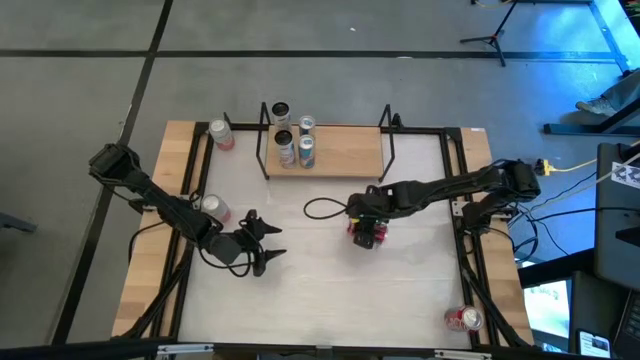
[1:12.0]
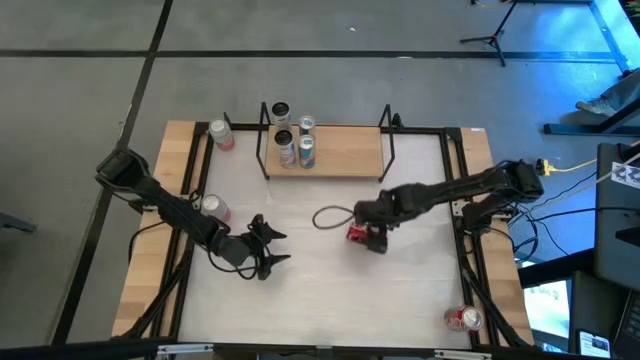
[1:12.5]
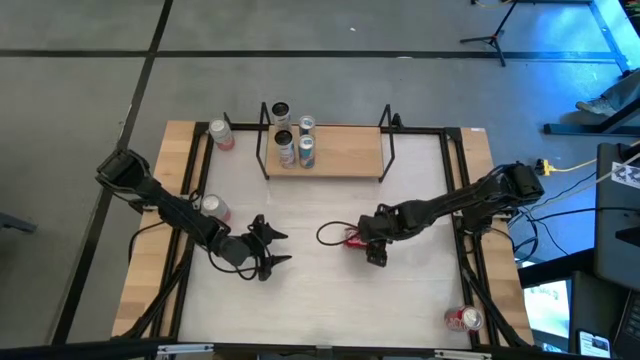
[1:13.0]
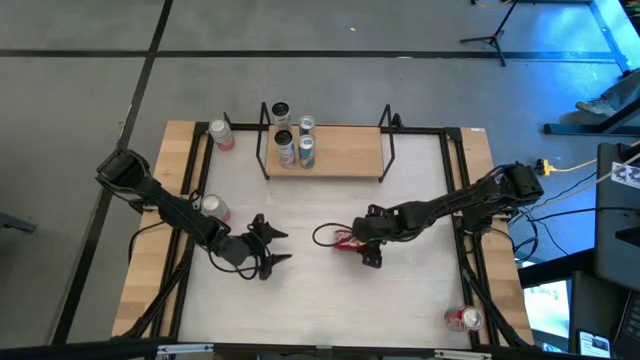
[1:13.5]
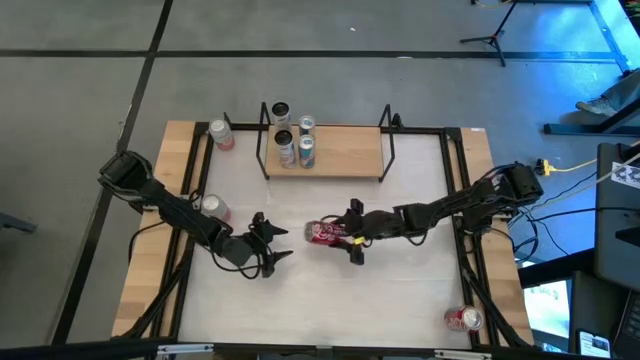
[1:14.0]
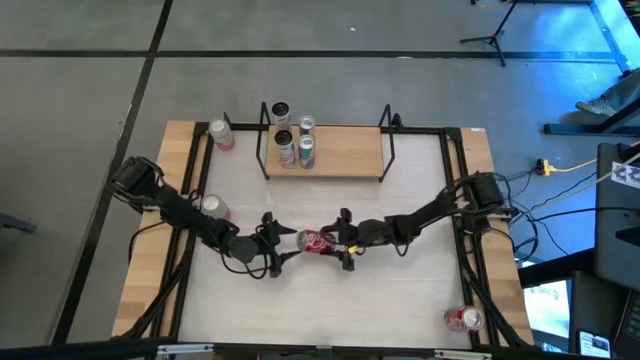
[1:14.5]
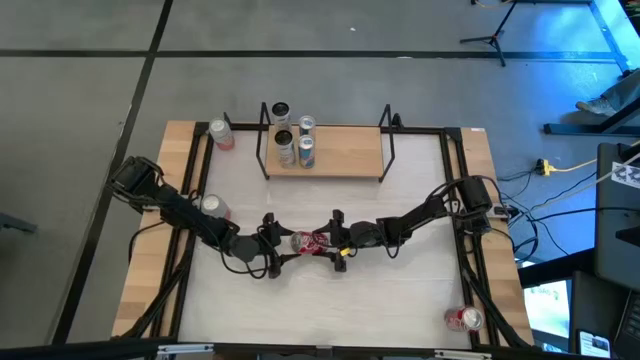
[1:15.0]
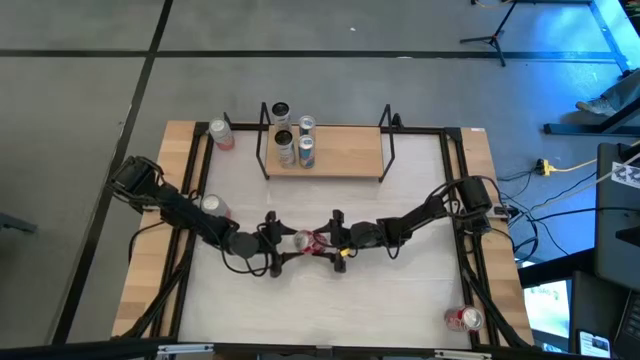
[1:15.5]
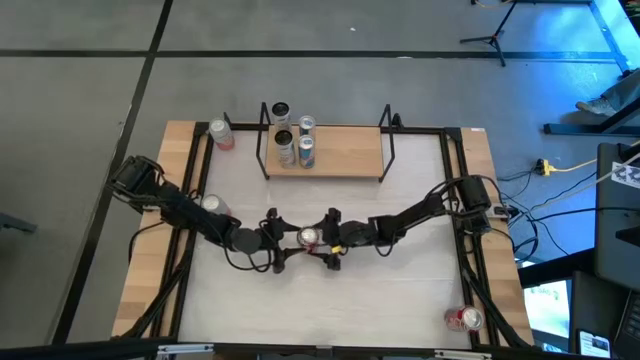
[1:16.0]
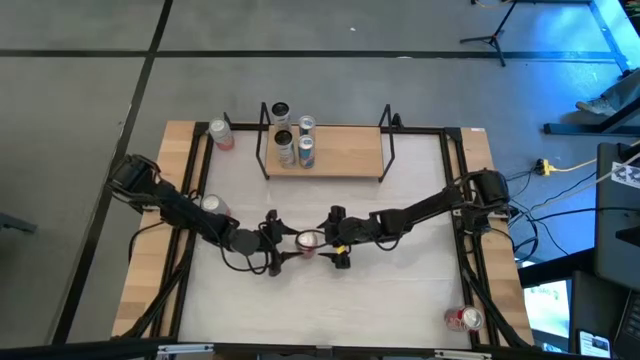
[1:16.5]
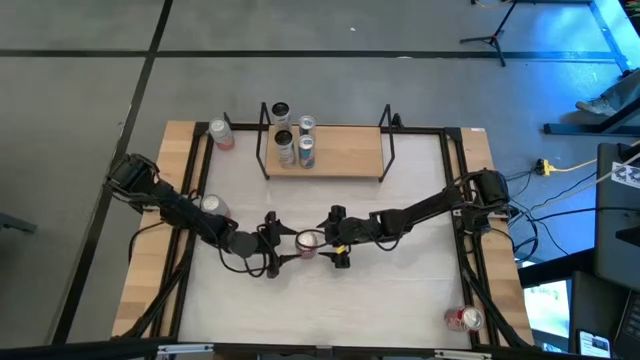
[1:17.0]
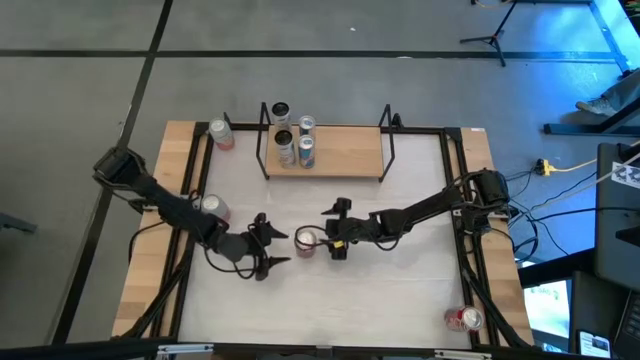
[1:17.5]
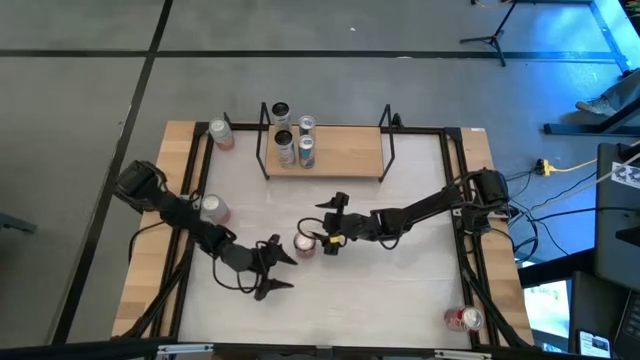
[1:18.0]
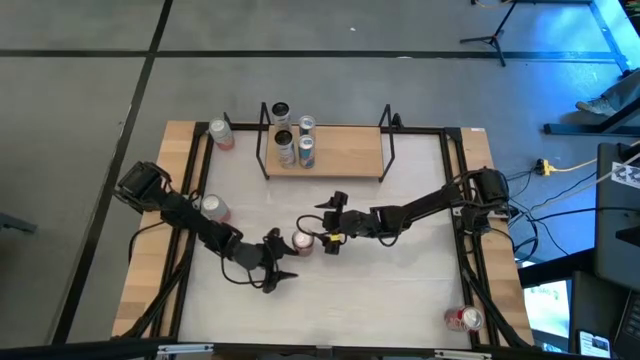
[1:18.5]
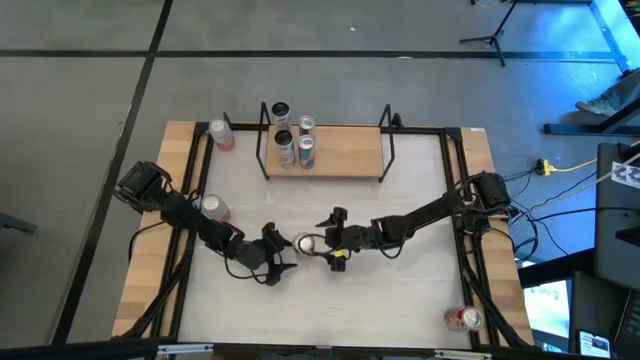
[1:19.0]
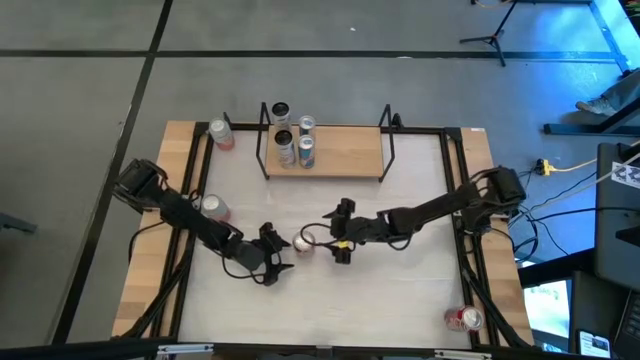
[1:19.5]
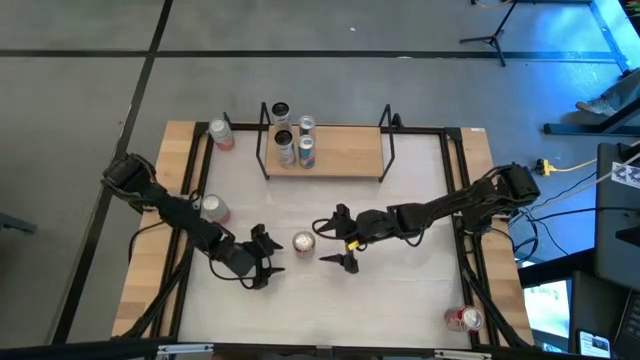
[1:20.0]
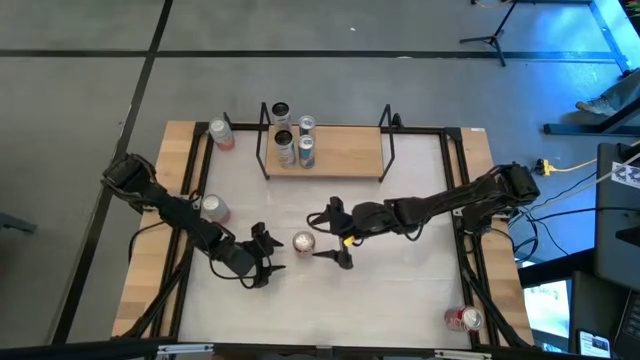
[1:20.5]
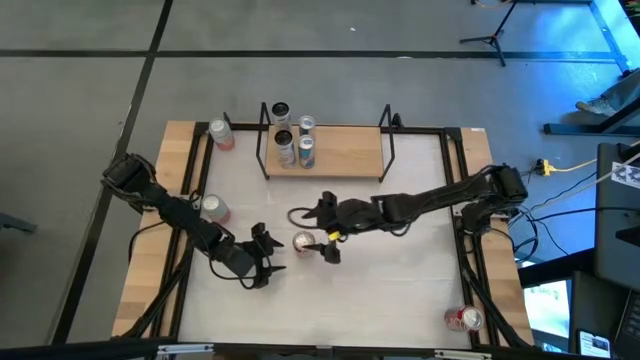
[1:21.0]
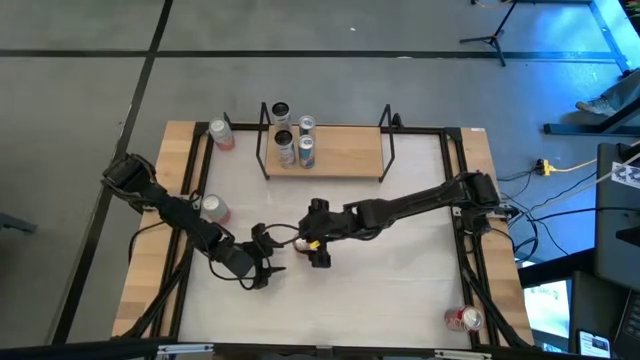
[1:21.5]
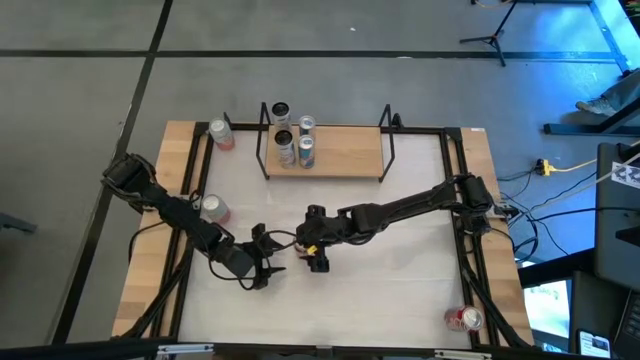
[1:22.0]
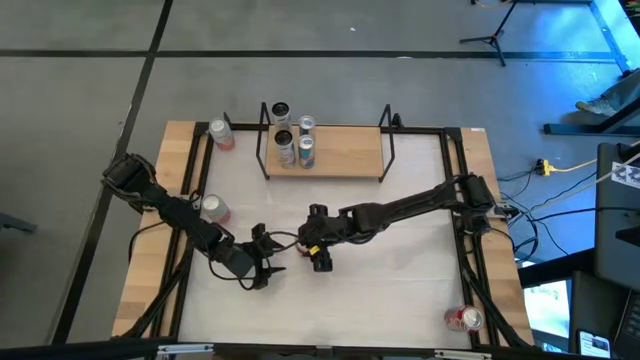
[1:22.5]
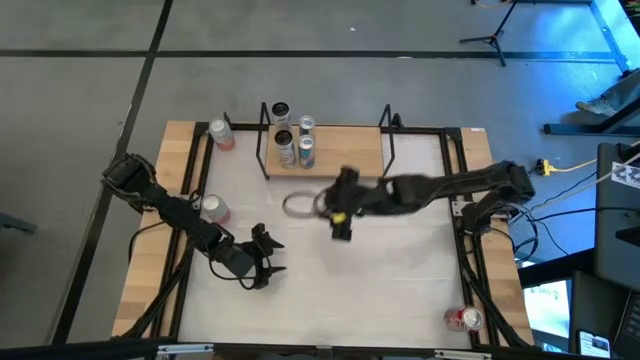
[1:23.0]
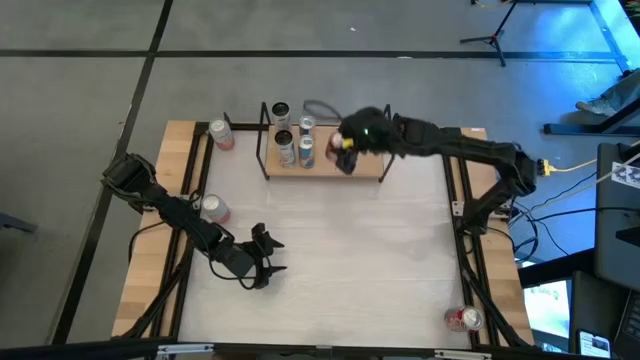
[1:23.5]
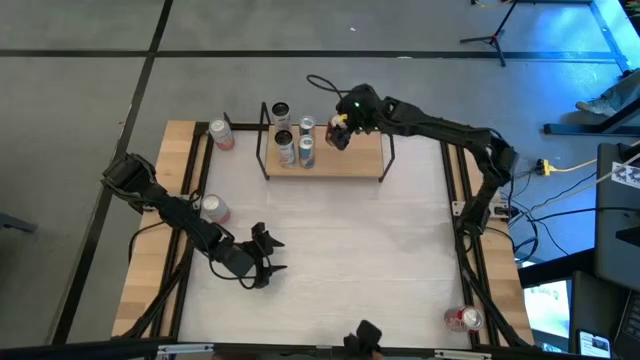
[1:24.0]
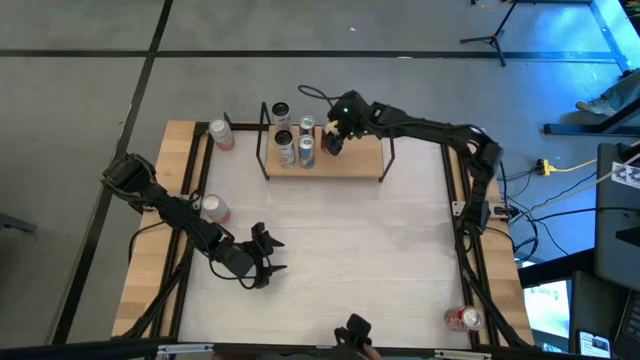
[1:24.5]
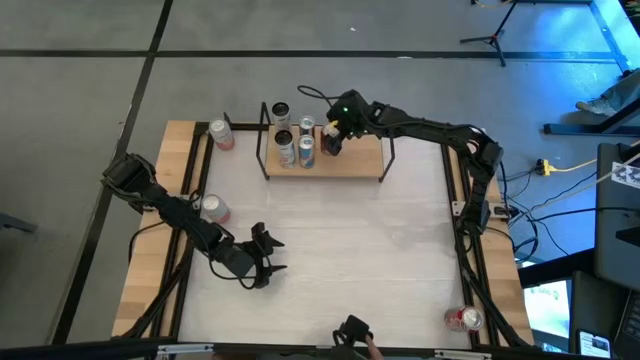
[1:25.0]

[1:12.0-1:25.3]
Task: Place canned beverage on shelf
Put the top red-black soda can on the shelf

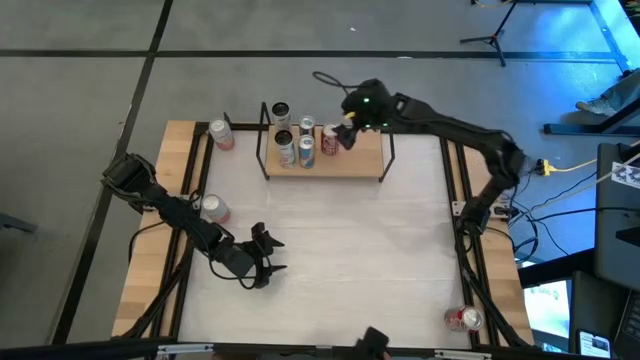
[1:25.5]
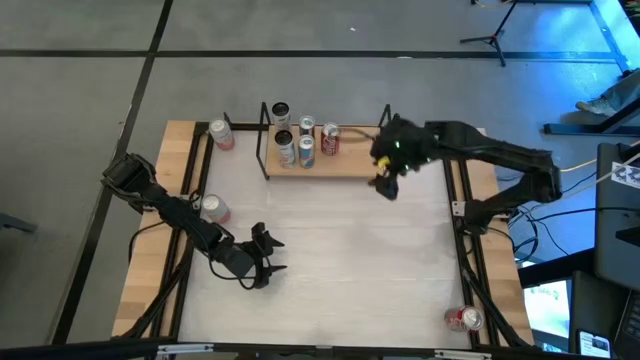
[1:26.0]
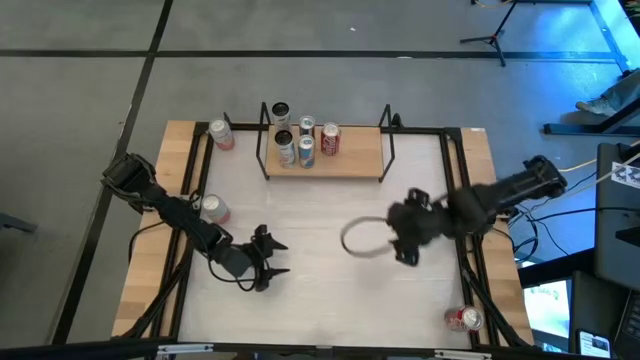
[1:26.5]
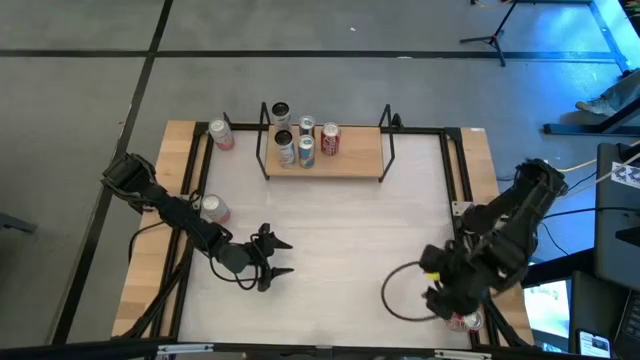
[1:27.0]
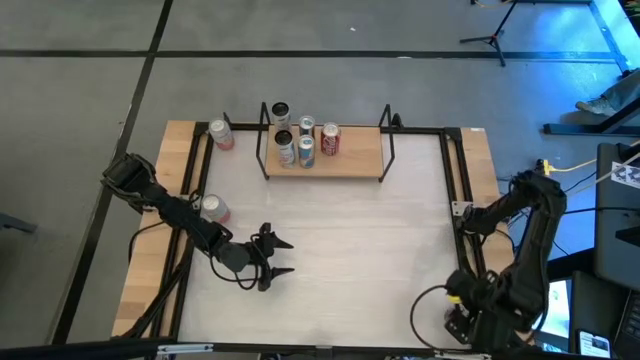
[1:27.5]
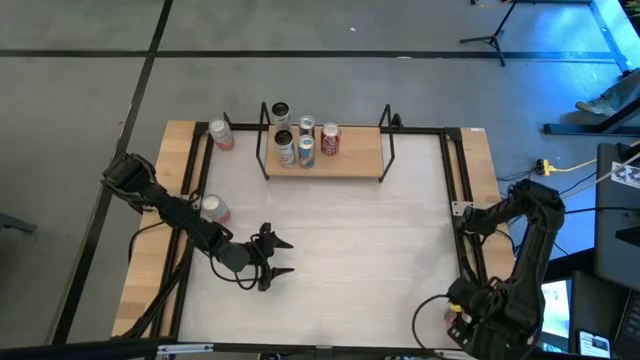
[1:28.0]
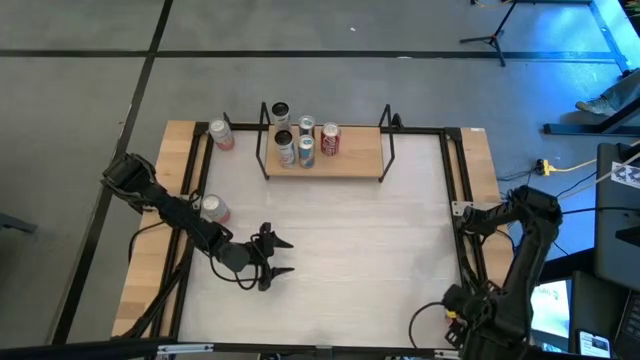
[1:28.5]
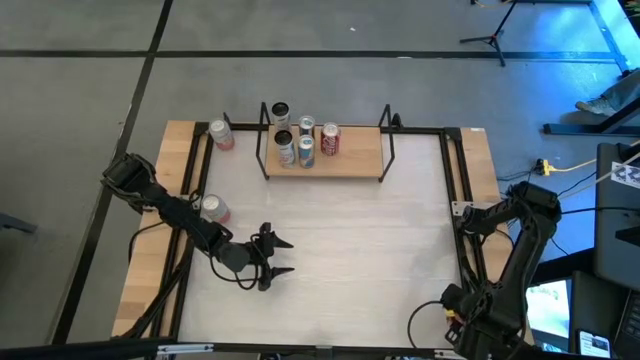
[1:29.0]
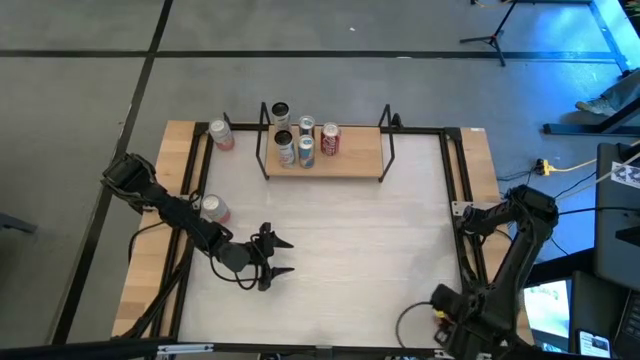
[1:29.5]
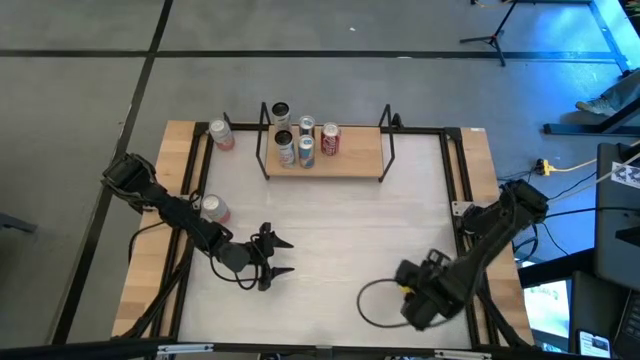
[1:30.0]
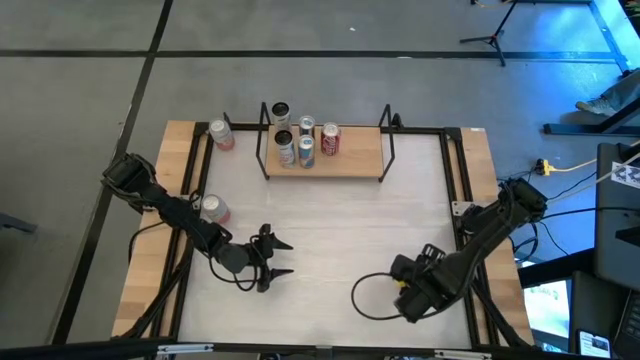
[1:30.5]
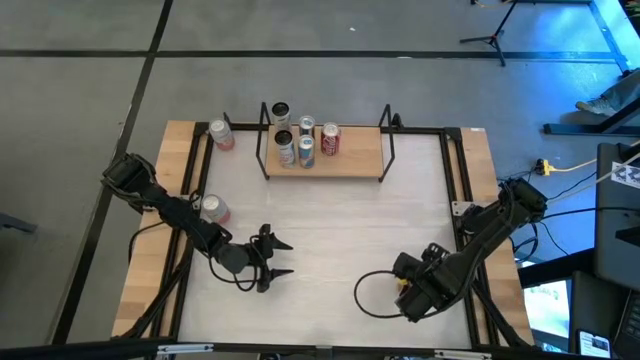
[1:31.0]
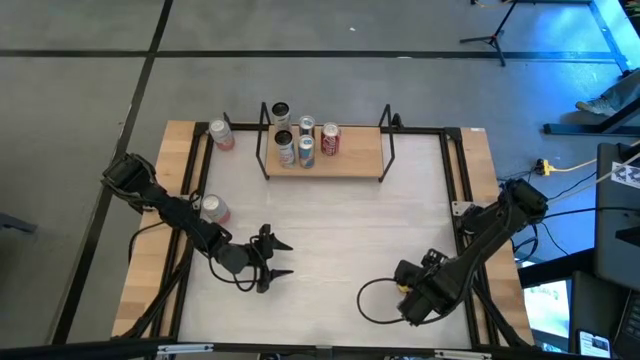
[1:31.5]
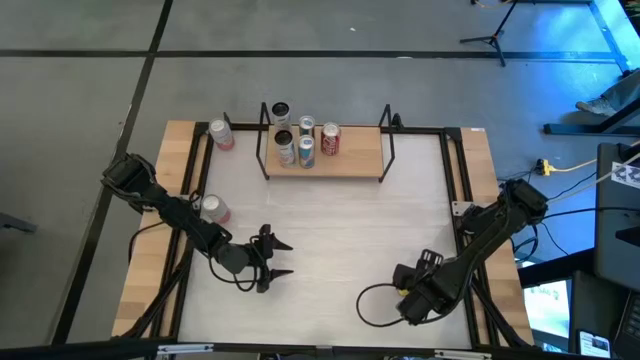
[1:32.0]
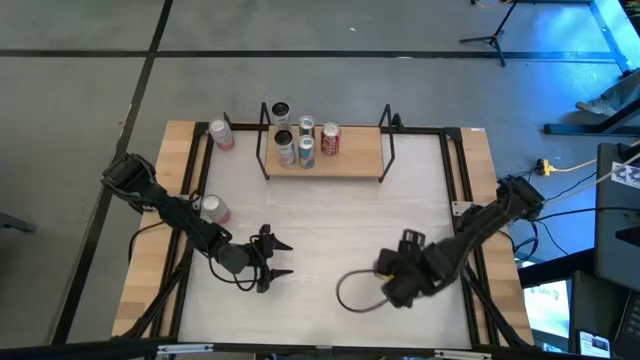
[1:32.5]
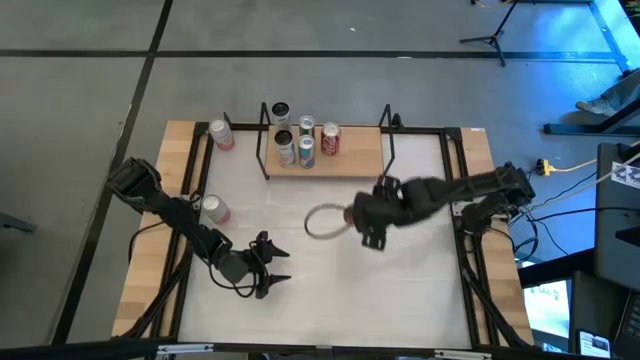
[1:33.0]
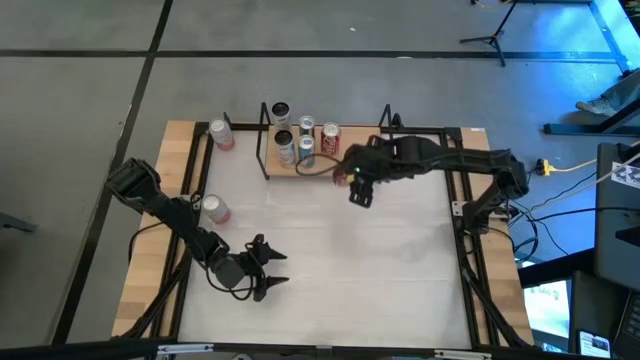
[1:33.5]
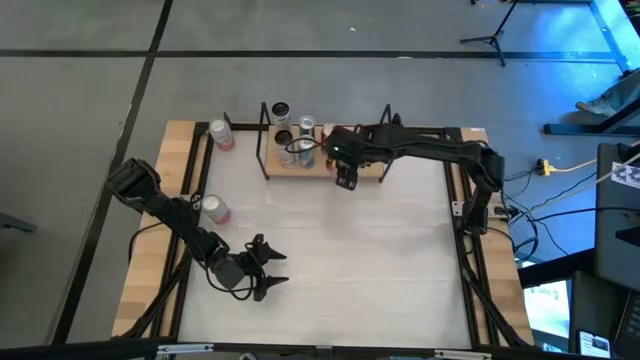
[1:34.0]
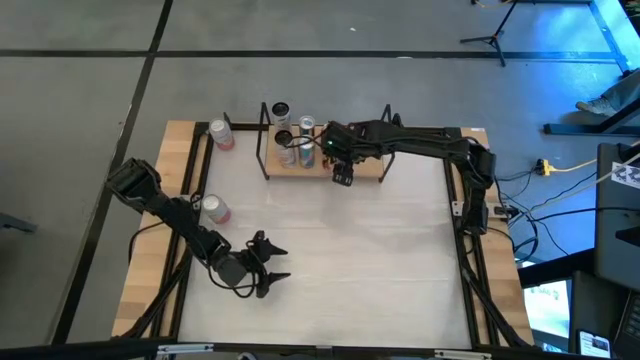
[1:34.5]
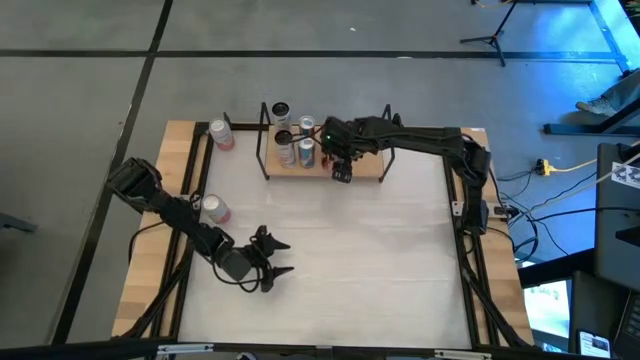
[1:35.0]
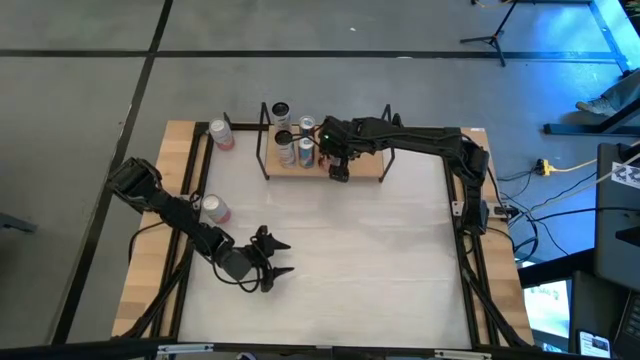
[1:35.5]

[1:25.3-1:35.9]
Put the red-black soda can on the shelf aligned with the other red-black soda can
